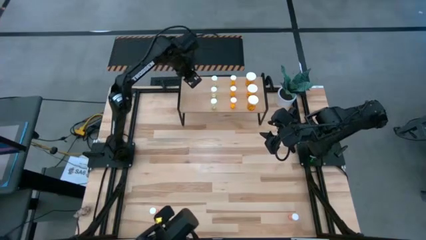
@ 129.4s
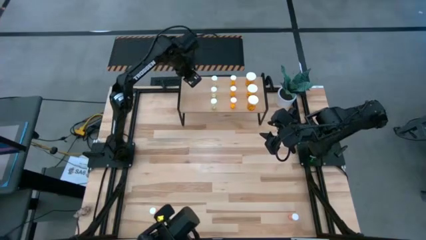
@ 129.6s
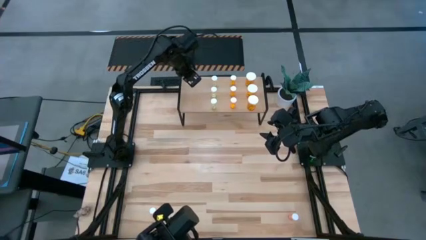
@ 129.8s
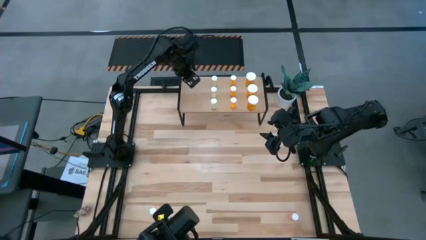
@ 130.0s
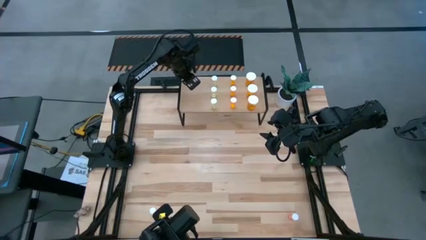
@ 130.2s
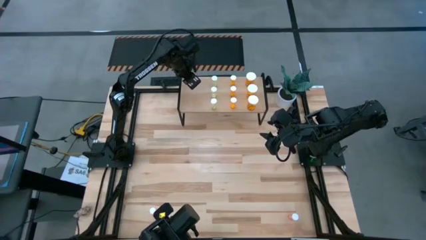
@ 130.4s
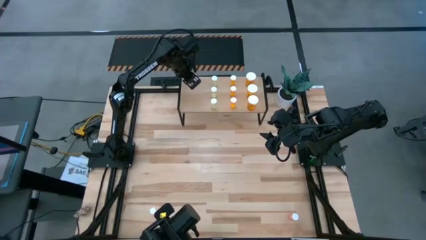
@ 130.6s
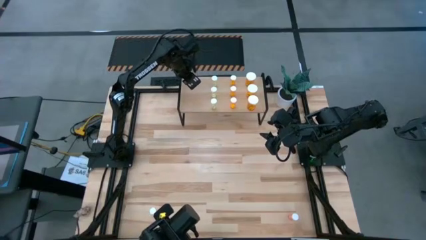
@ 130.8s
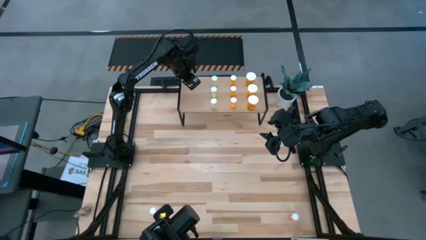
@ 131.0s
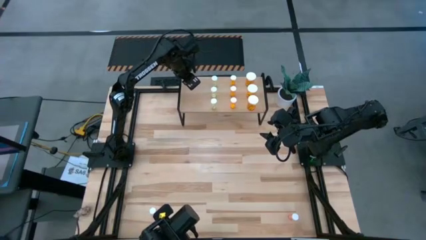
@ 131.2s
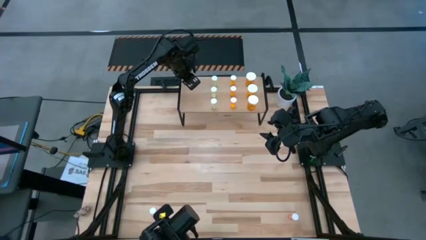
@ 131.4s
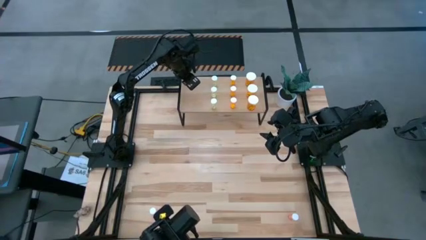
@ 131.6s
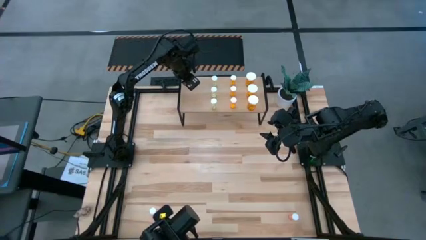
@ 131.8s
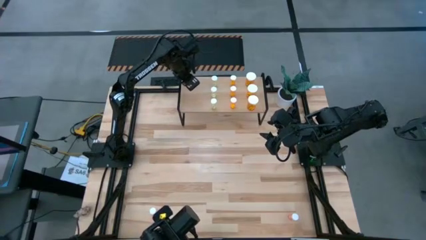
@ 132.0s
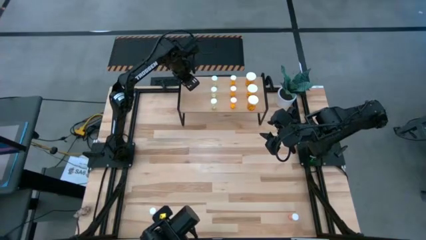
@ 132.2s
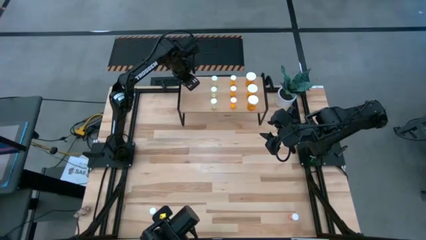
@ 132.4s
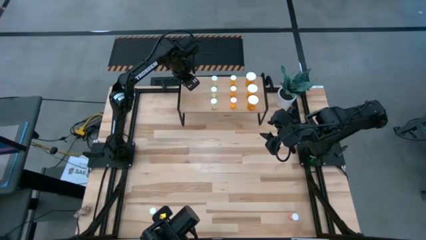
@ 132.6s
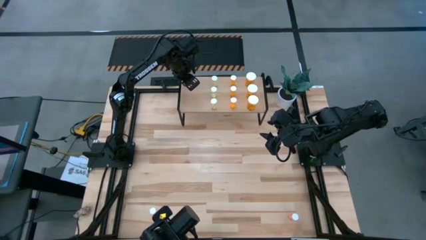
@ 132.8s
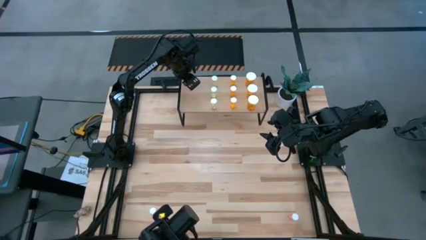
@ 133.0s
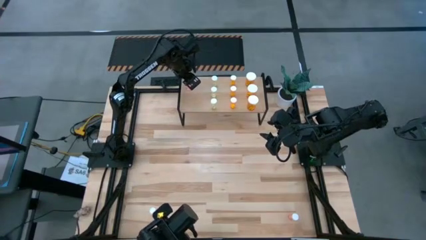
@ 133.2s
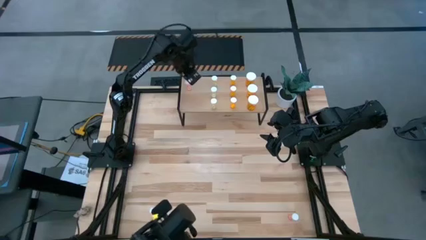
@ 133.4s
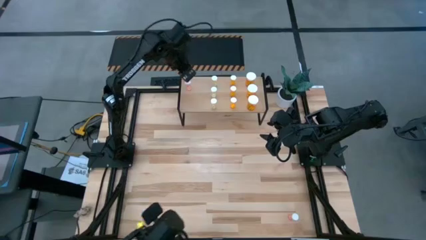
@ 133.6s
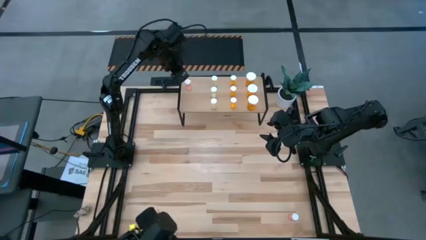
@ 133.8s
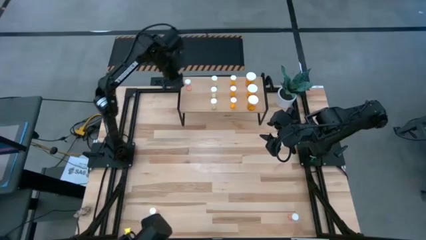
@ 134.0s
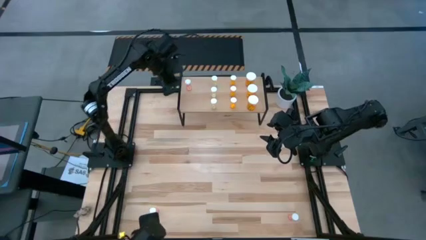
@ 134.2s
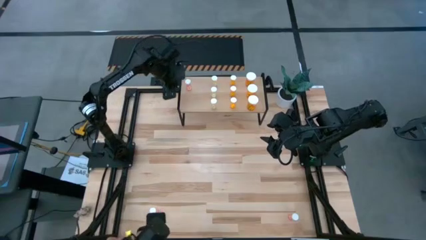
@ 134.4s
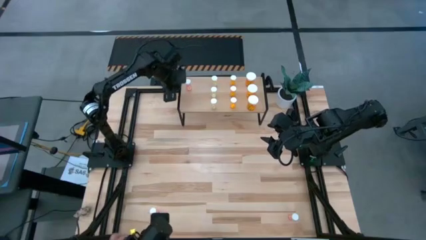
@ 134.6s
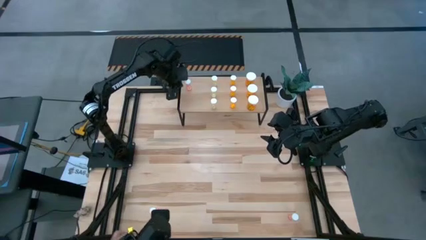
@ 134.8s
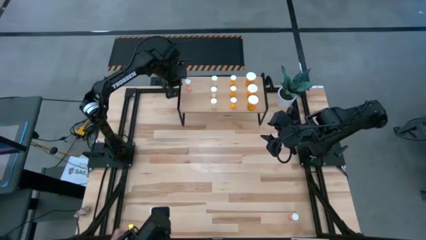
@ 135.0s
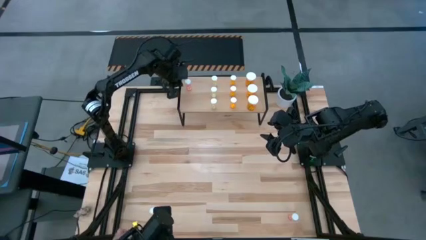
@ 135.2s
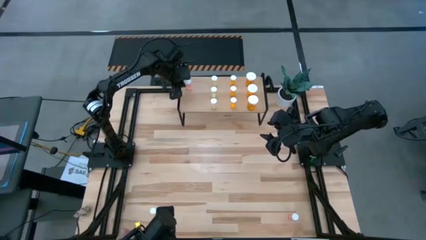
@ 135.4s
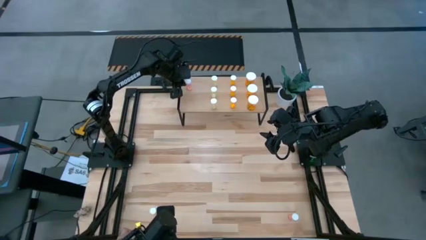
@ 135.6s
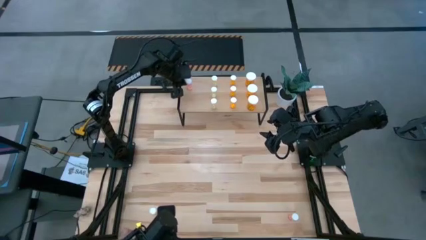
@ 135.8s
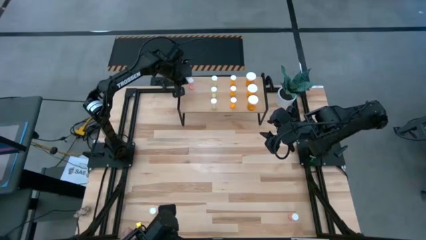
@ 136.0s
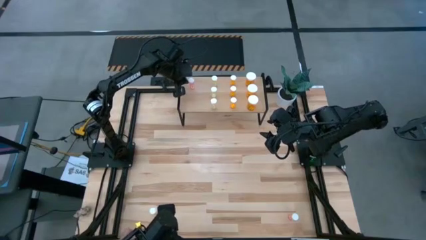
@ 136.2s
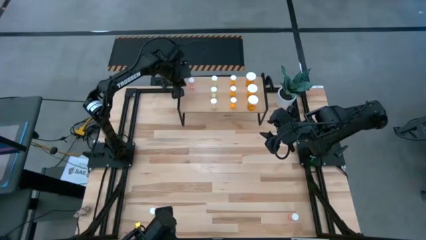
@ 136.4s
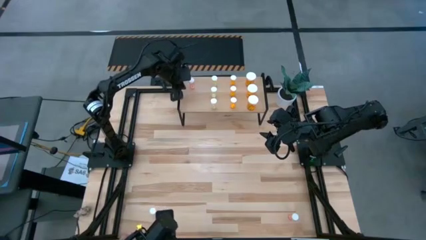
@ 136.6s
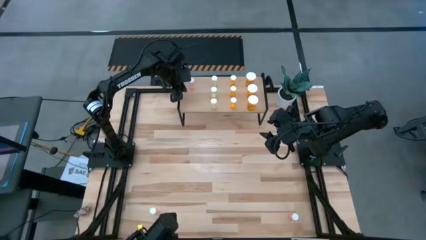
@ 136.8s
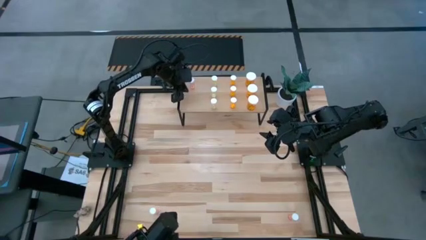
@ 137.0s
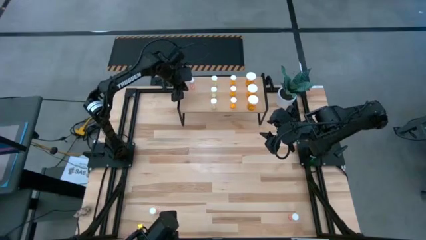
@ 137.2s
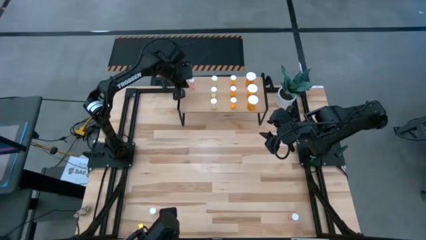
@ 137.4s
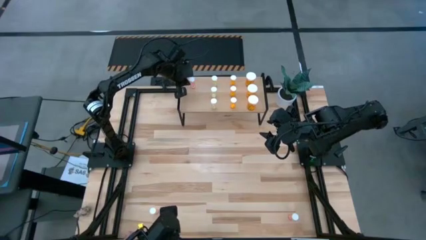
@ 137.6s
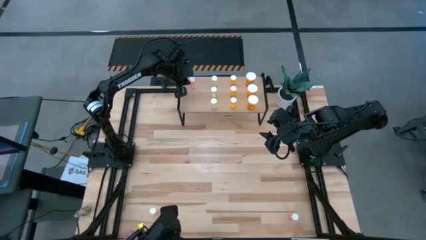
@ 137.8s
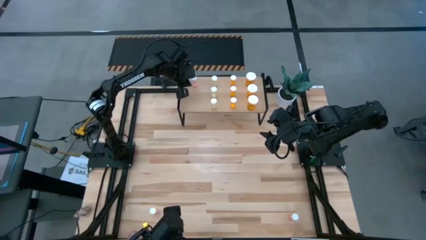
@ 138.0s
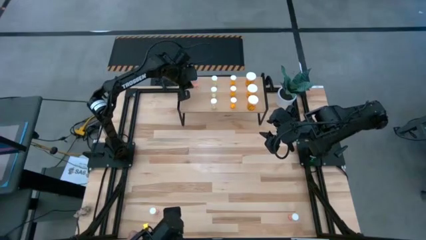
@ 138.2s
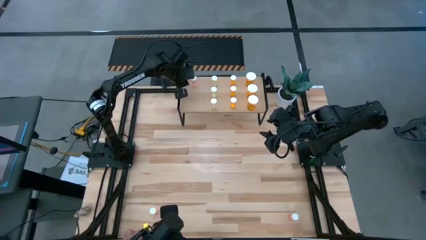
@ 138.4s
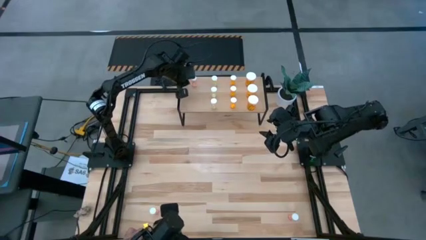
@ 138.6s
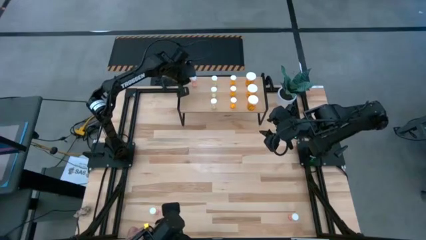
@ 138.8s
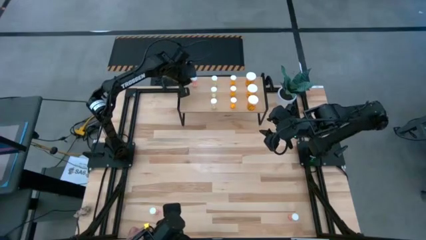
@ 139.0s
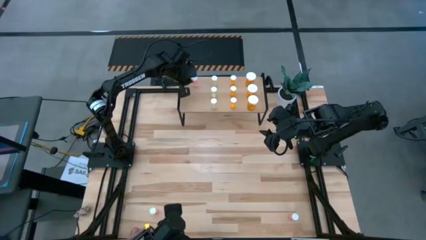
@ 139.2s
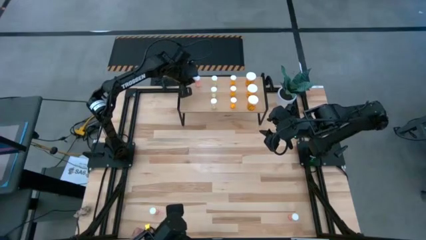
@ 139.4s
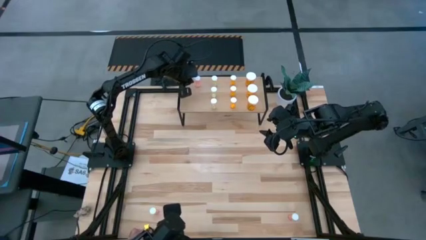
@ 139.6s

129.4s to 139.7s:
Task: Pick and place medicine bottles onto shelf by color
Put the top pink pill bottle to the top on the shelf

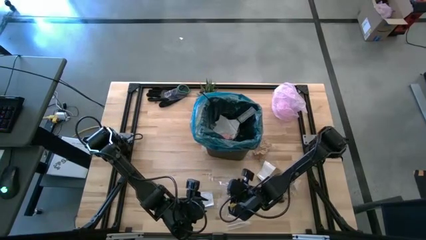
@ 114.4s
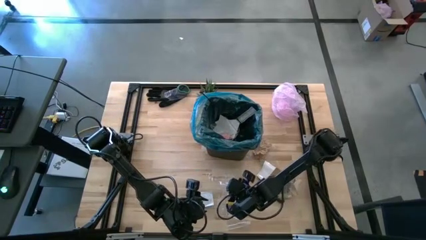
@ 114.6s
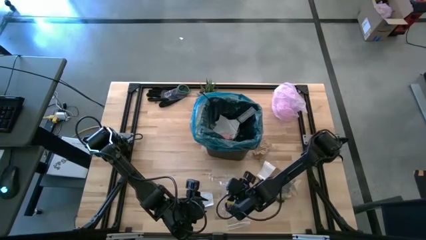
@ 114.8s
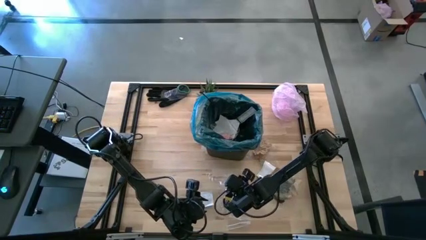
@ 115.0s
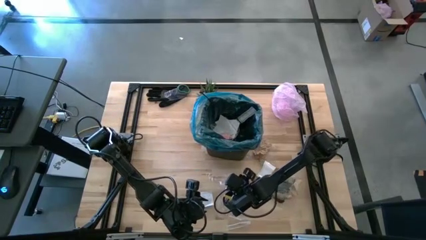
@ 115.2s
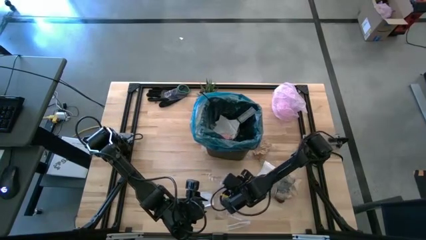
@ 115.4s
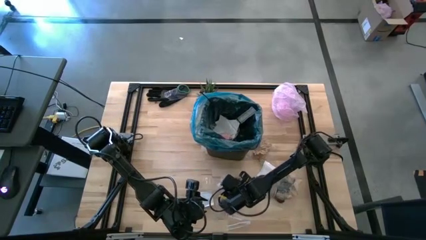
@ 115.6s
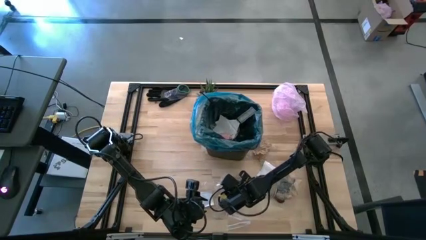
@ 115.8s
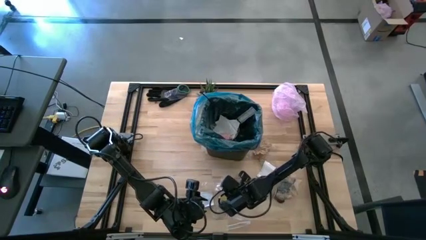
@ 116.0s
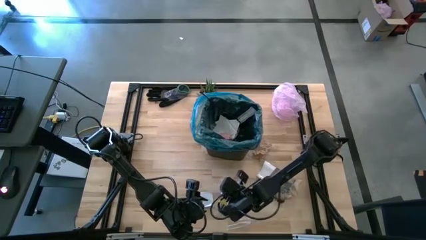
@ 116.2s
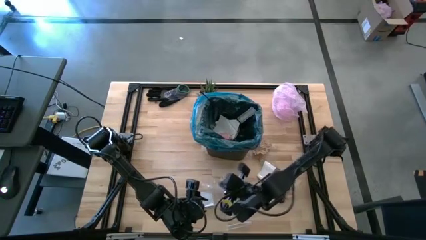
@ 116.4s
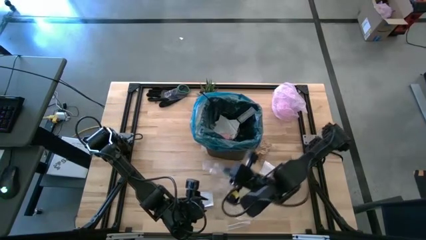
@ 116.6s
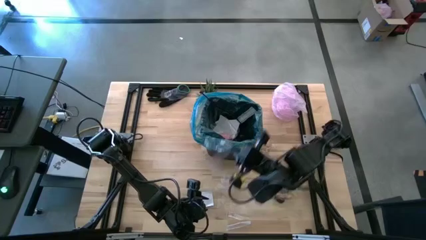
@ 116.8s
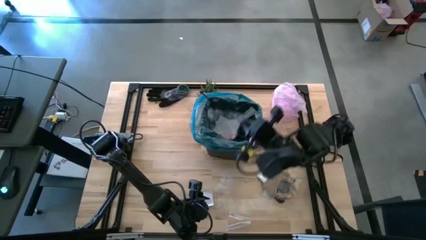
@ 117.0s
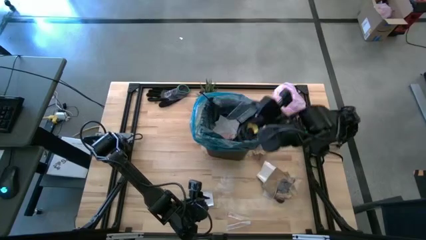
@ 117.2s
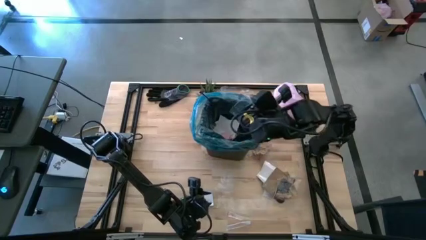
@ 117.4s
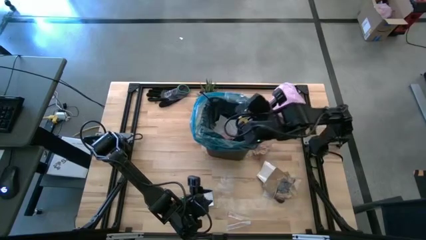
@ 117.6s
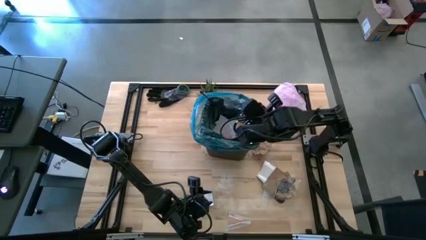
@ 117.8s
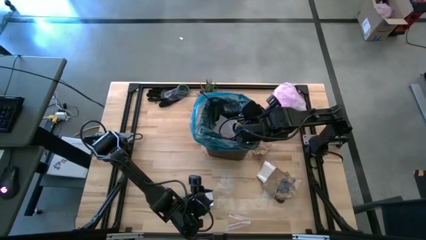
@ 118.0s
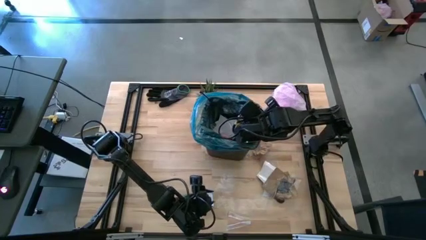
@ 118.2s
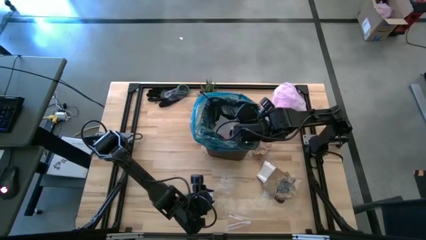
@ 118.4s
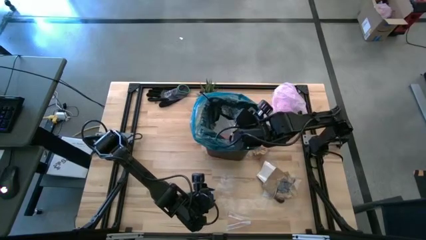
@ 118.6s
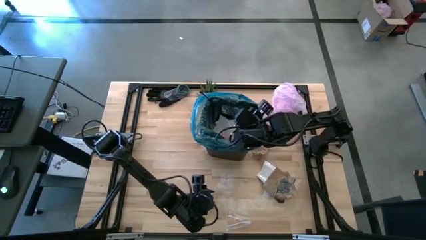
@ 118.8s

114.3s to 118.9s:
Task: place trash/remove bag and relplace
Put the transparent plastic into the trash bin

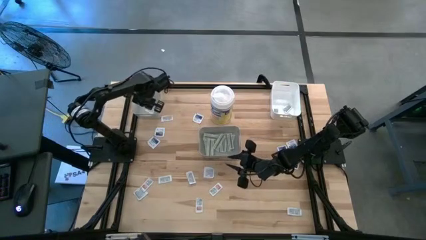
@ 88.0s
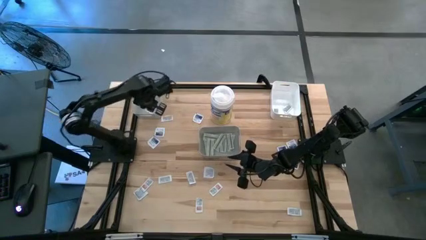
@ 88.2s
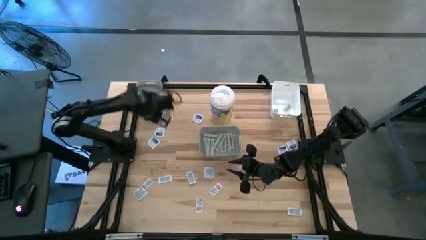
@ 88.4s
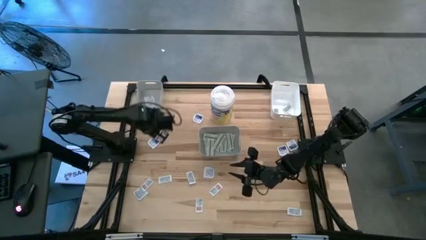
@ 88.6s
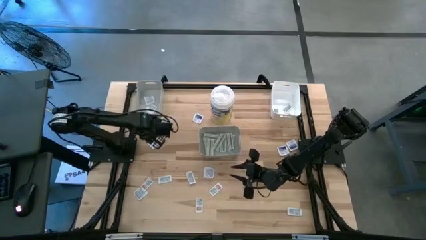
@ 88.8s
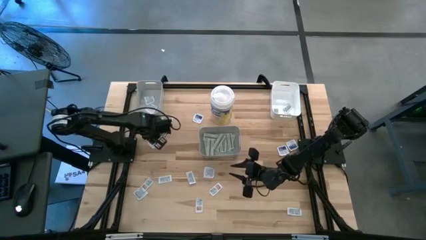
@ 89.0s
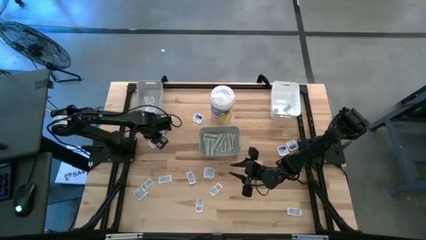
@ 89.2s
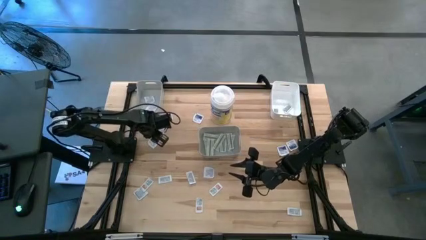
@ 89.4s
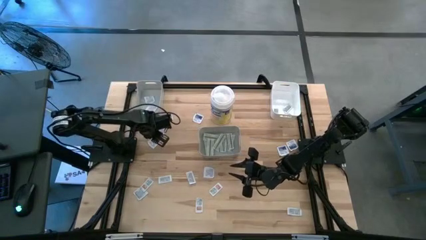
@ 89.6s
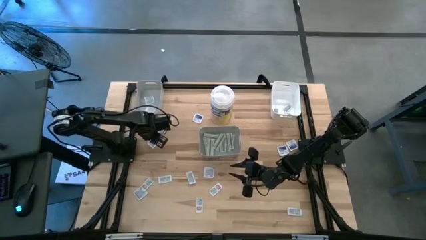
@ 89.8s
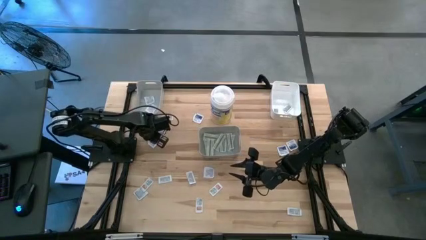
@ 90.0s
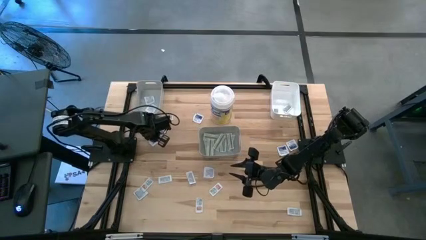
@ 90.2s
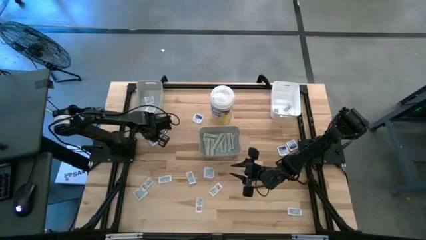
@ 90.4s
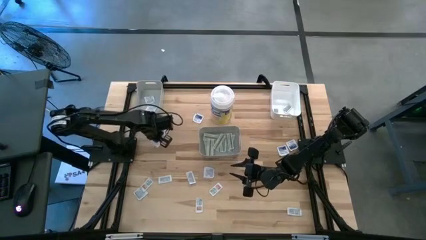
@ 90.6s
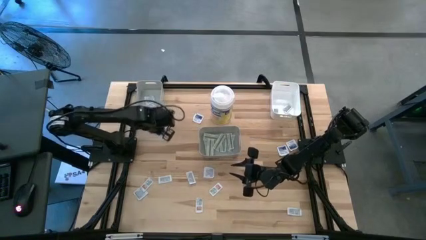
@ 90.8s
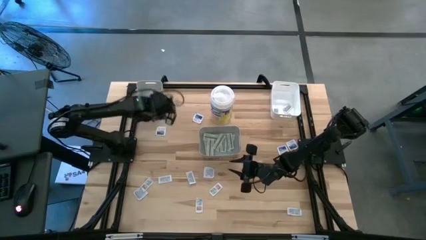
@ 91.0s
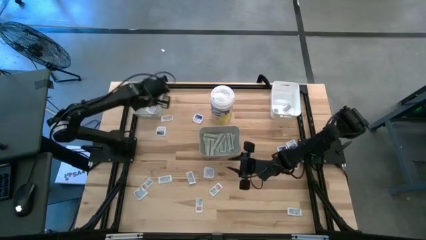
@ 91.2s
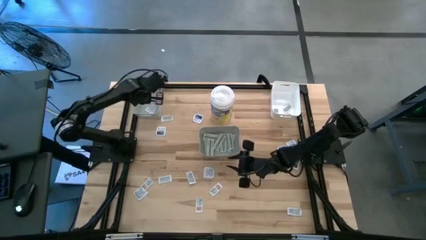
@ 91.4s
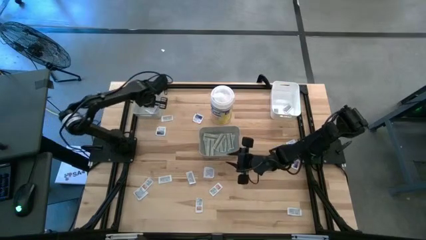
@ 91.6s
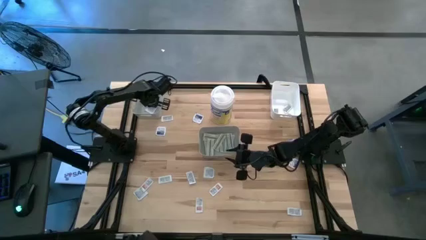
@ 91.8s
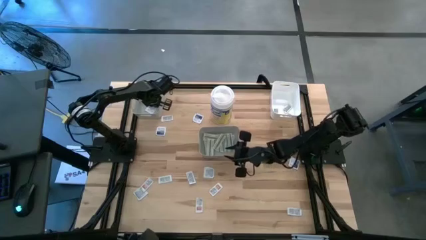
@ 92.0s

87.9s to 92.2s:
Task: Pick & Place First Aid Supplies
Put the alcohol pad into the top gray bin
